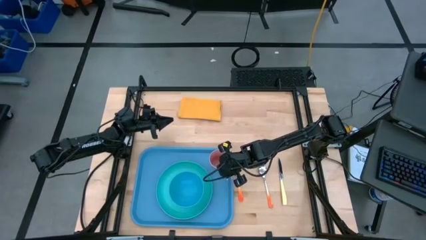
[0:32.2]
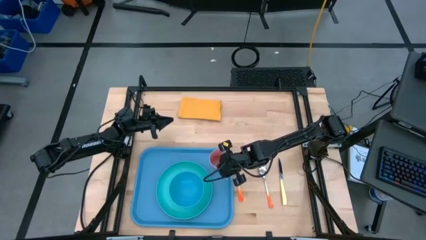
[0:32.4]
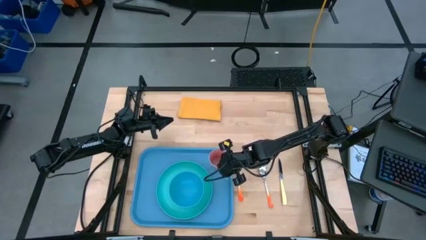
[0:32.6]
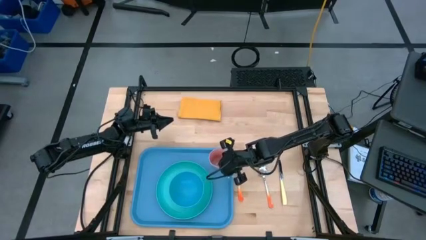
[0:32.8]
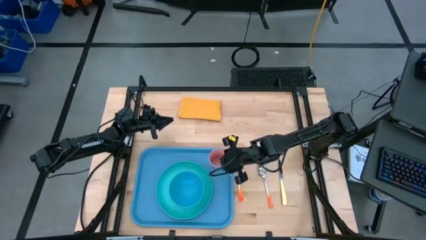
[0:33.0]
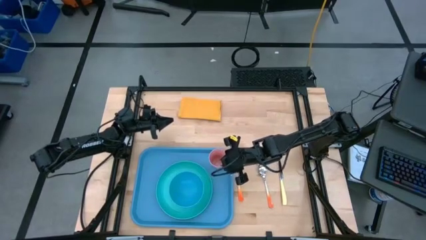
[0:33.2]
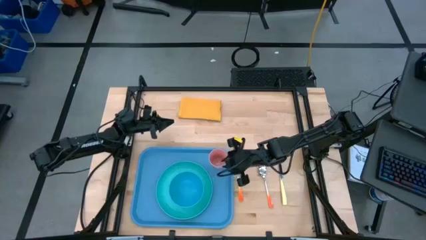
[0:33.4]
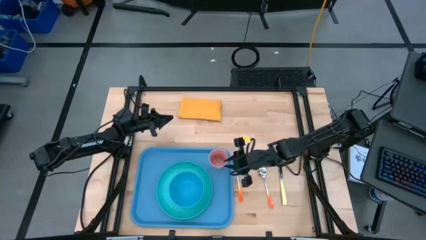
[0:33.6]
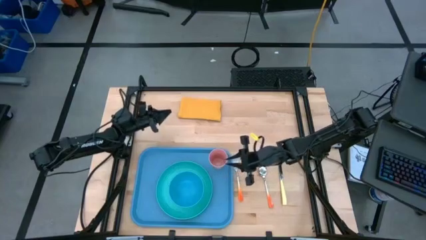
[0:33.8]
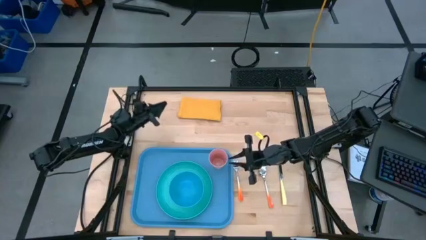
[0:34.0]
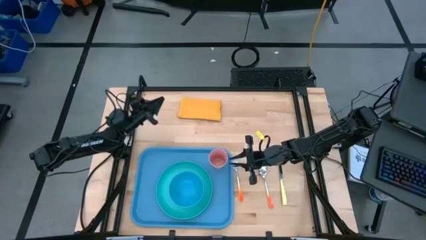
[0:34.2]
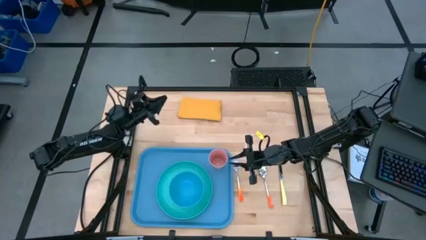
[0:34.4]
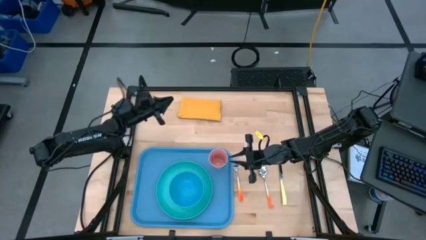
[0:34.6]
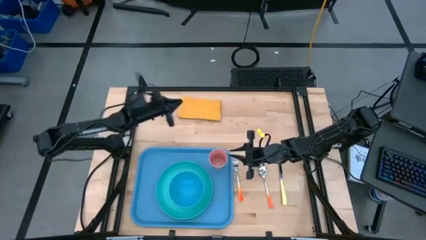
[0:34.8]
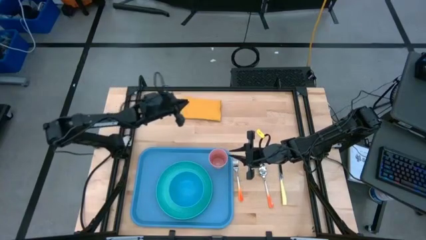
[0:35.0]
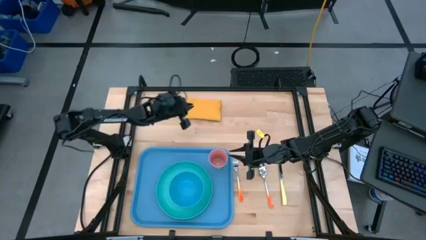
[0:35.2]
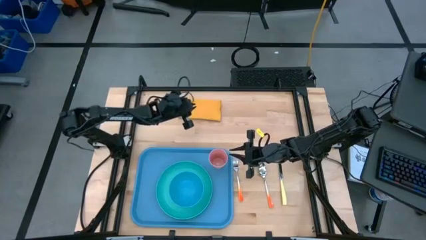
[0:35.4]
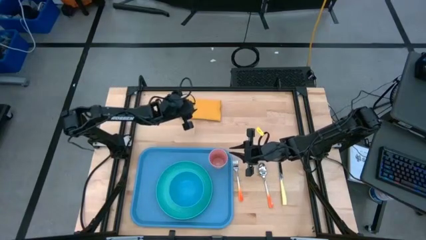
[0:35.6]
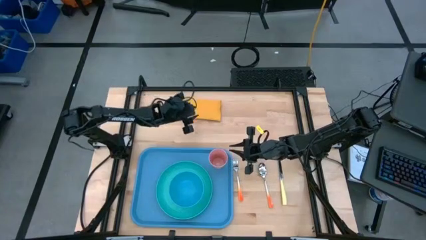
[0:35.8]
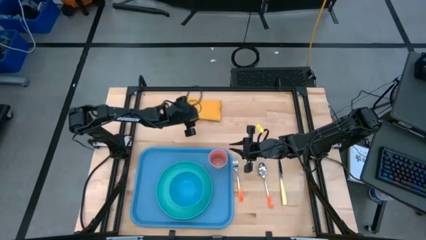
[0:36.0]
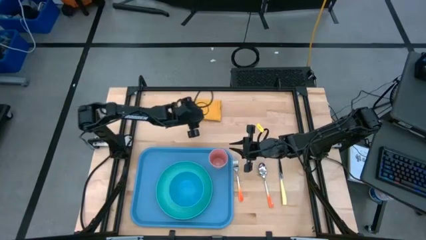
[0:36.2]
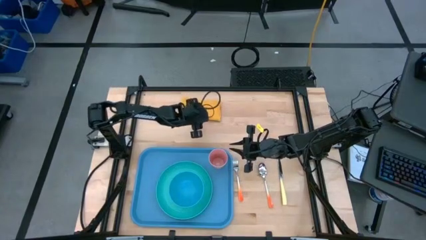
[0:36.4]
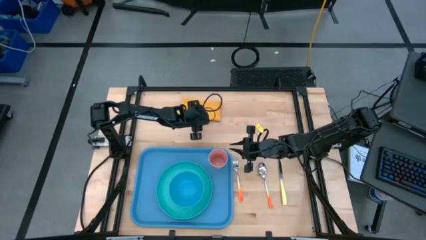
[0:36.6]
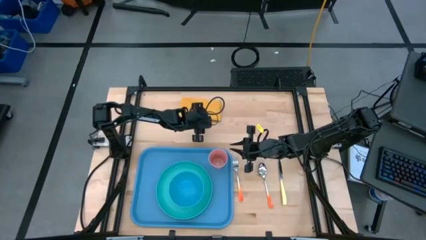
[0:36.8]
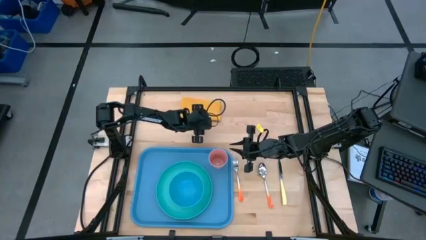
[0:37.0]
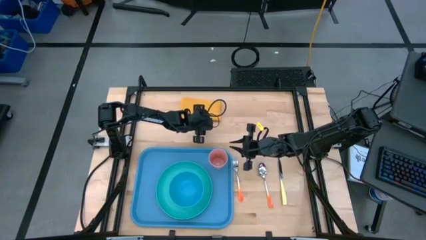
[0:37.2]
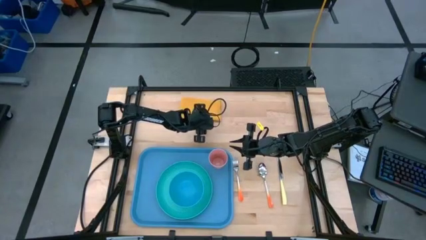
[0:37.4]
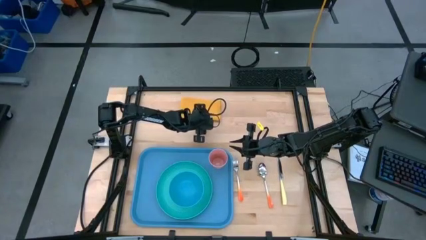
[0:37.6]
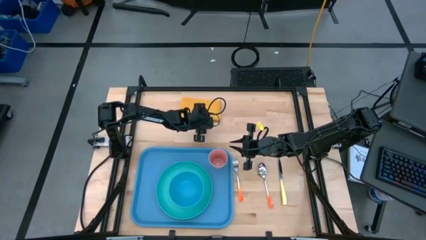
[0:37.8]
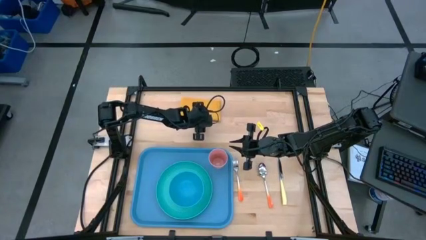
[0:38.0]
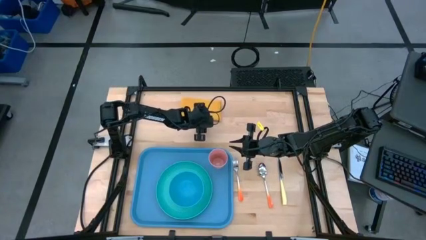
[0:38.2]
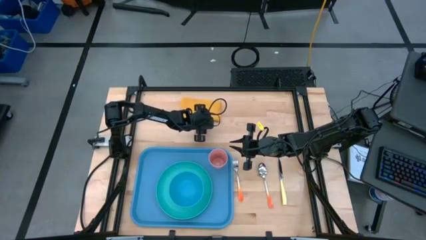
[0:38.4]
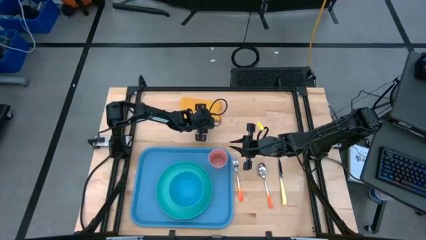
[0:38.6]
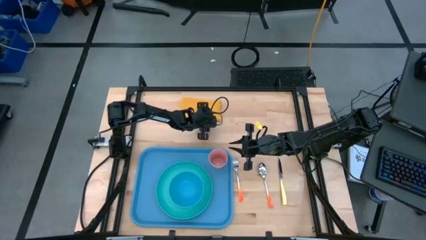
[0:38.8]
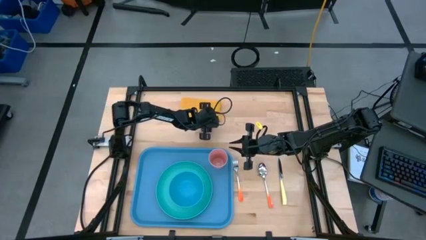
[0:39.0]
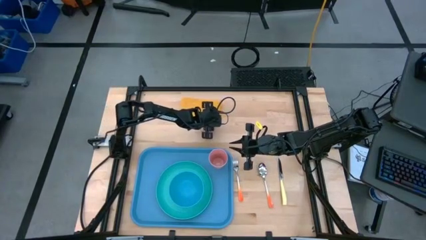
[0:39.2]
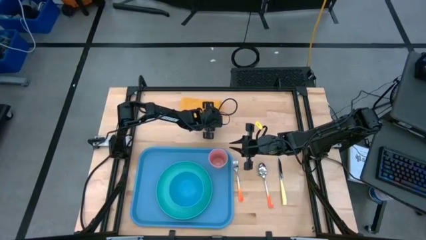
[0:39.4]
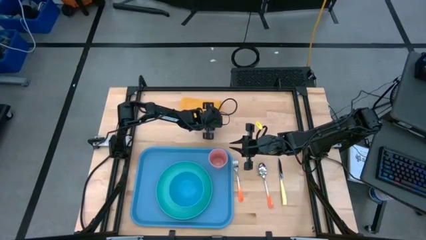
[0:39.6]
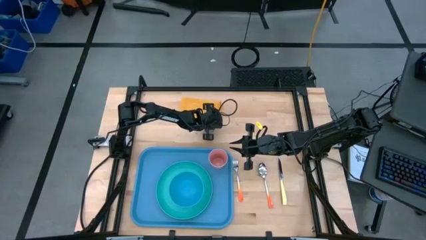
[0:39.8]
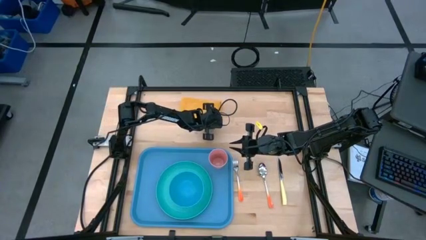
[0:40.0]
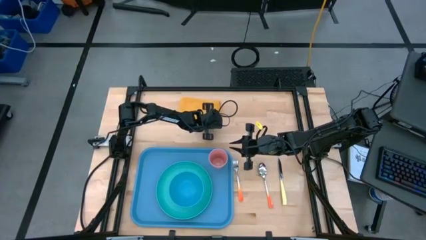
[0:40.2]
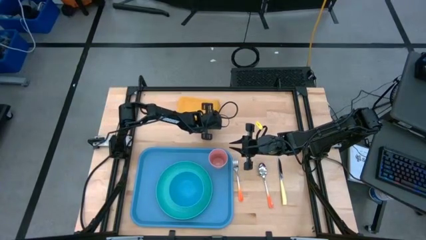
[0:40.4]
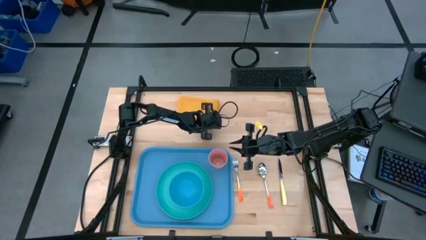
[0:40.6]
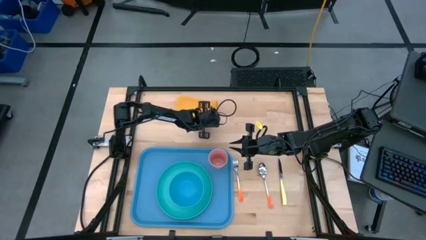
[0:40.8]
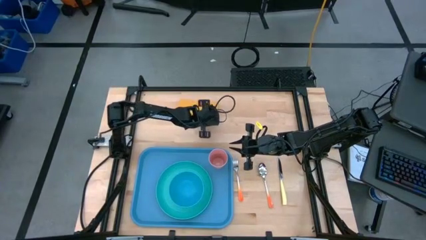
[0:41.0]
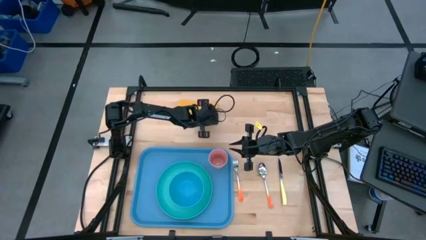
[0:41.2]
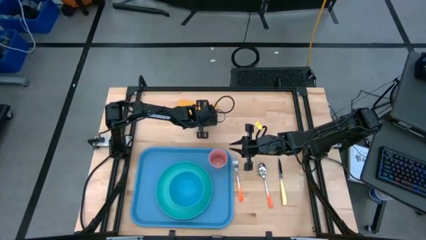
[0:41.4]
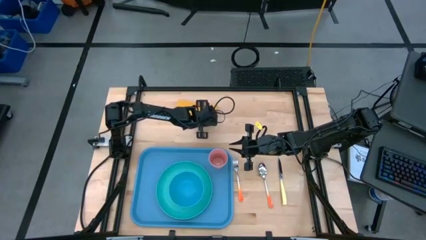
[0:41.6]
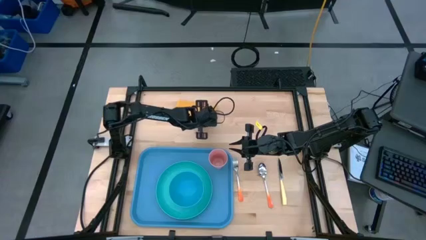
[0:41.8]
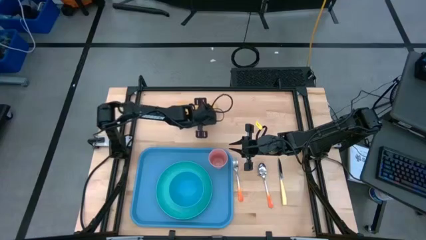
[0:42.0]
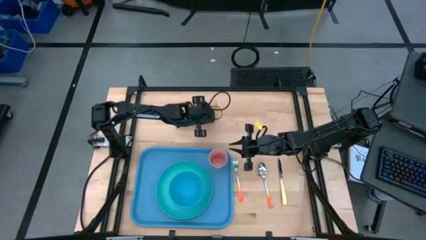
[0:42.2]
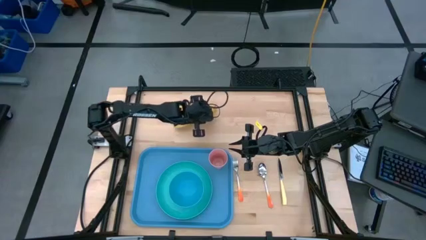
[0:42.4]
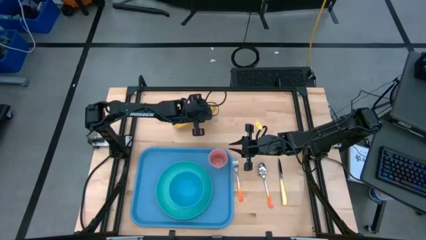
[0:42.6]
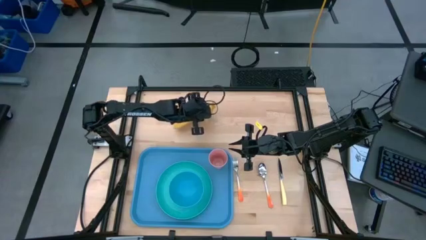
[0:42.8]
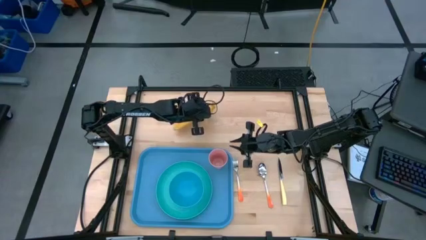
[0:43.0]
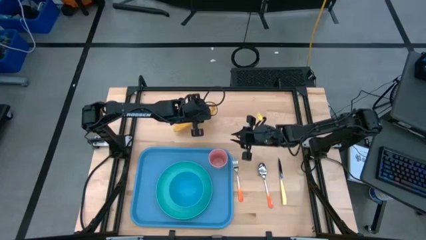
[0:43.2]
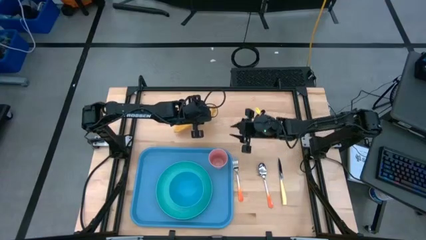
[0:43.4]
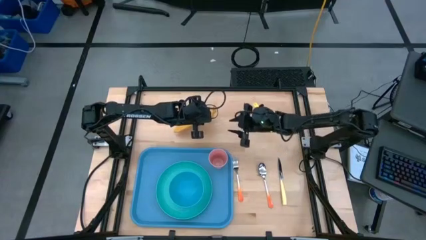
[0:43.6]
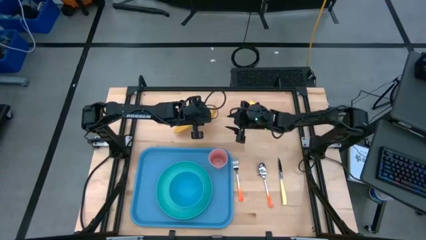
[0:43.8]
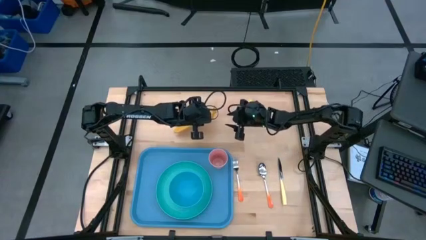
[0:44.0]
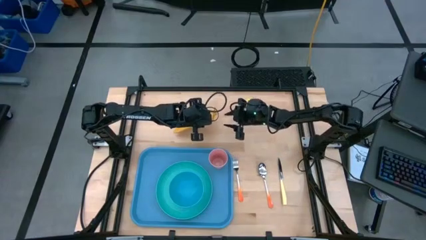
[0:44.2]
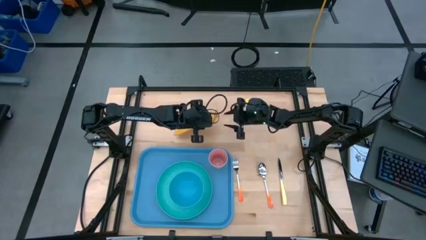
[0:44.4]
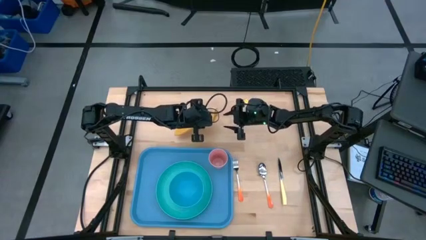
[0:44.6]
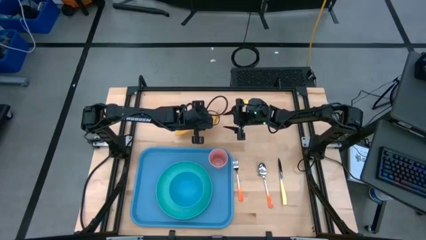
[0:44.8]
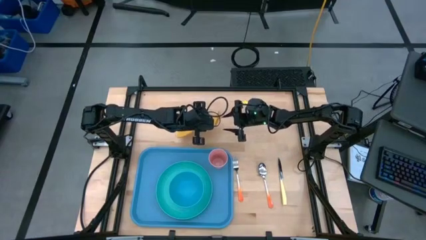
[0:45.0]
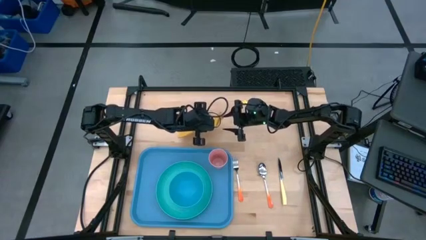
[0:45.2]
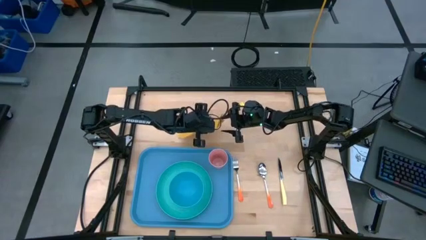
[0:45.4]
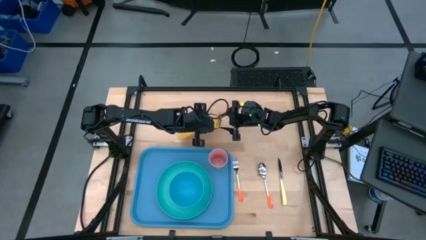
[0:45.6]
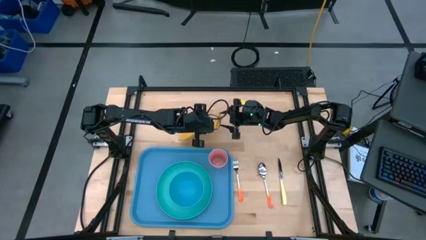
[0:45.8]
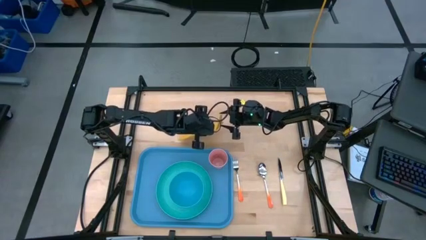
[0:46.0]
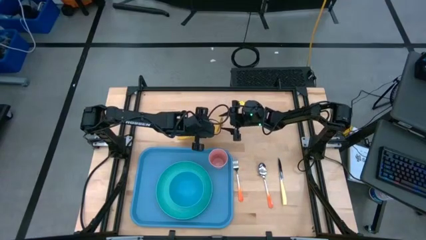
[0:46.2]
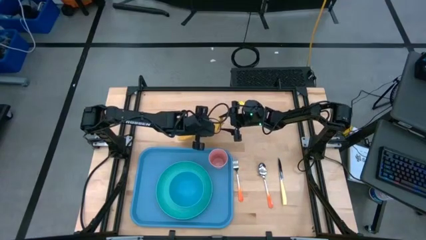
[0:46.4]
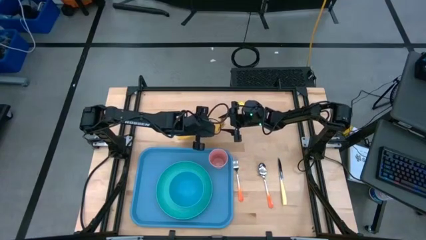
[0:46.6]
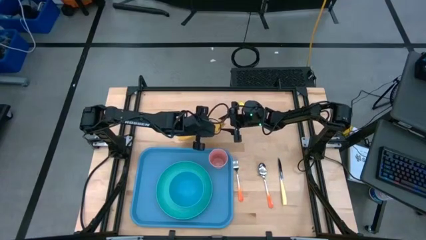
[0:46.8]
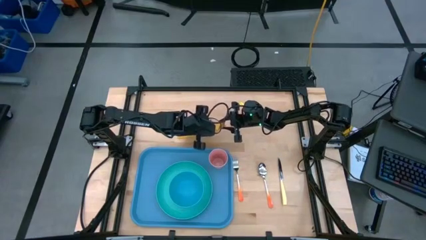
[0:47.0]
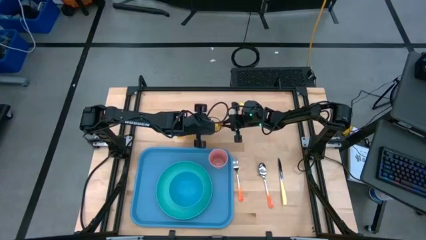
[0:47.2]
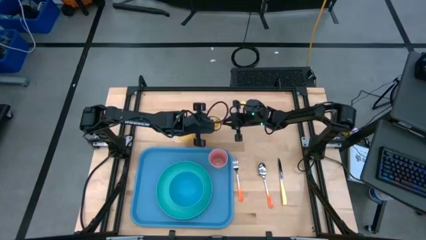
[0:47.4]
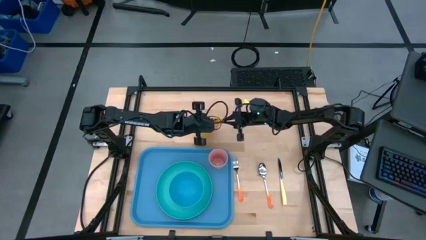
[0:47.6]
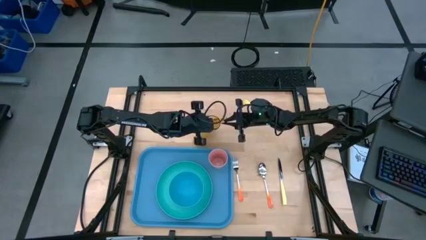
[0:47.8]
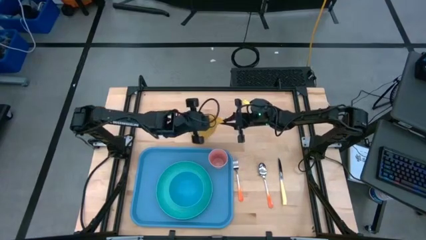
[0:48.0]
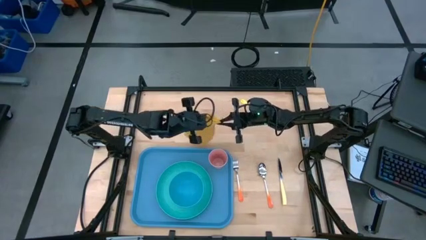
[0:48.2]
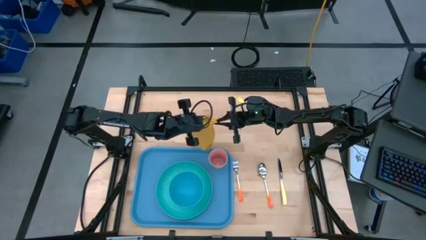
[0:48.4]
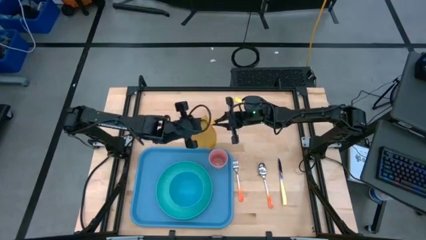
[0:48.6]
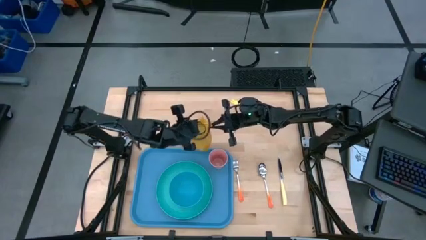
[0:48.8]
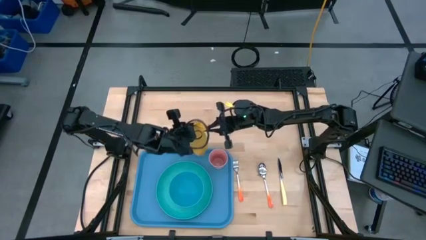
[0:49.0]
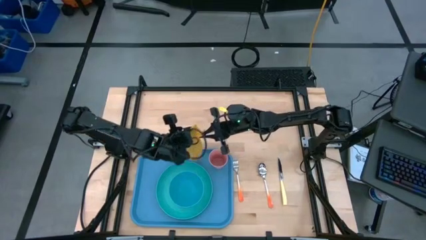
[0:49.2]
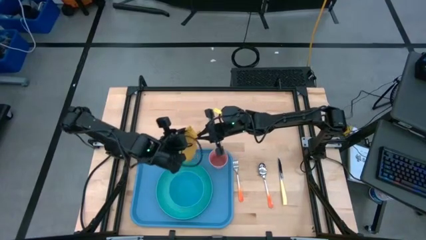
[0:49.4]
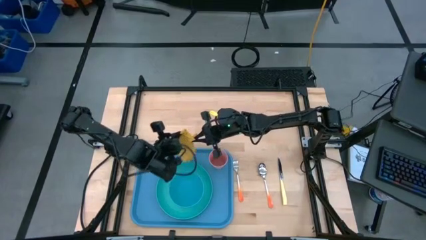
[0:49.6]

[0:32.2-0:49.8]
Task: Set up tray
Put the yellow table napkin on top of the blue tray to the left of the green plate
